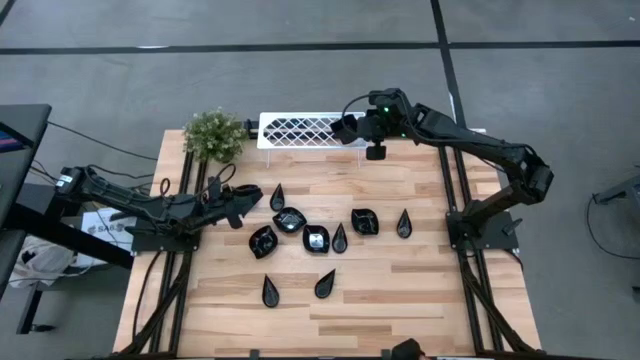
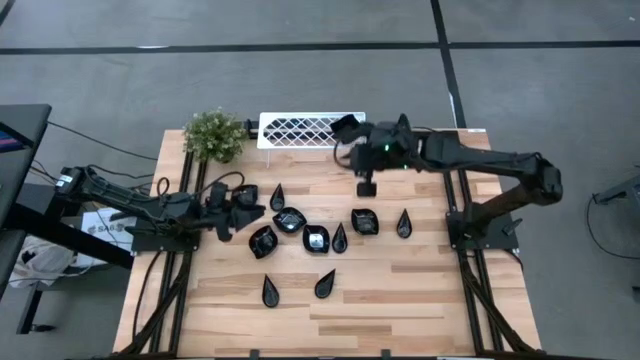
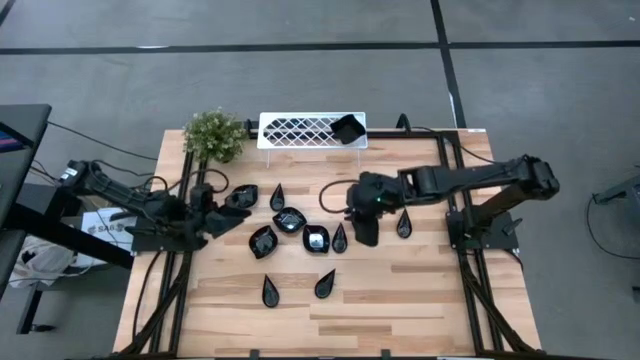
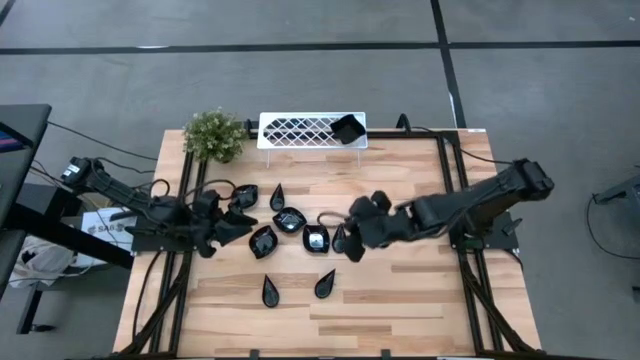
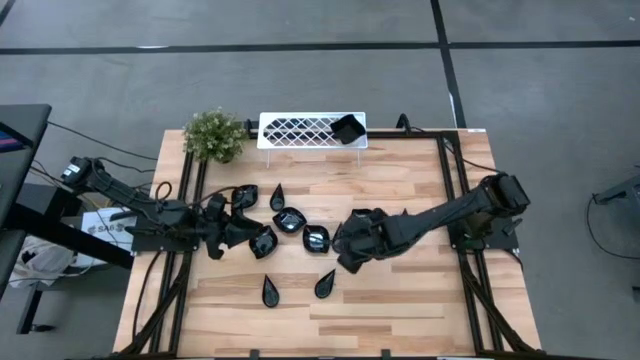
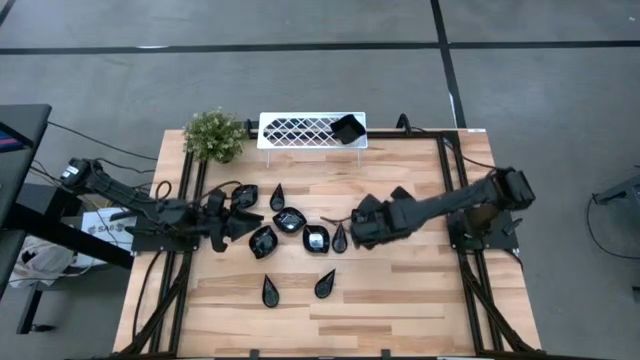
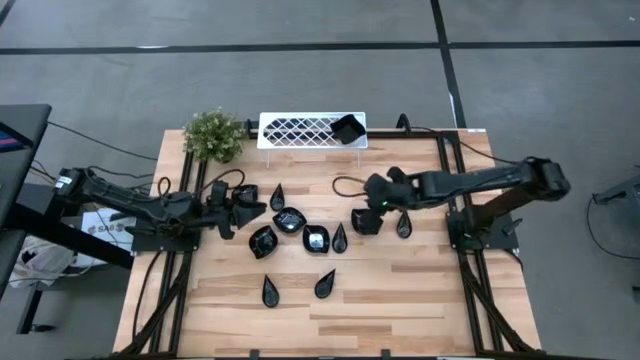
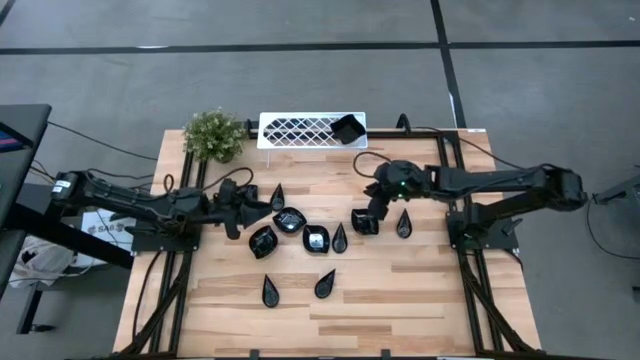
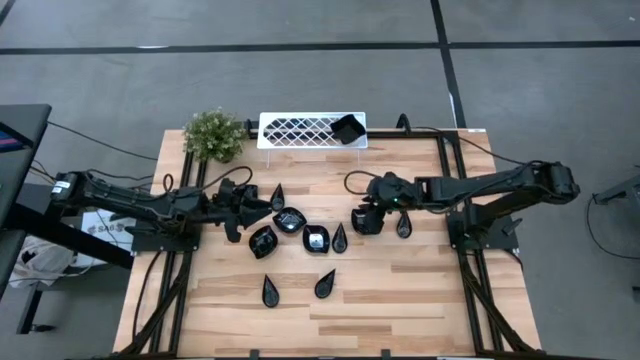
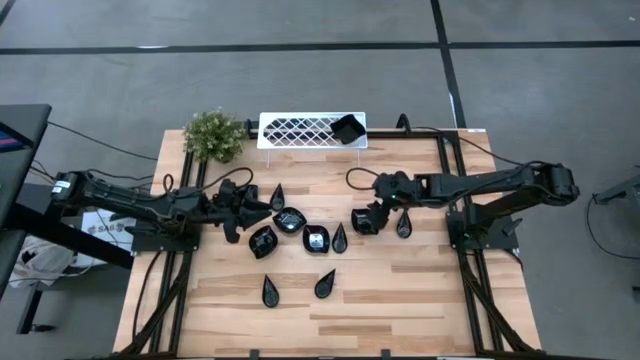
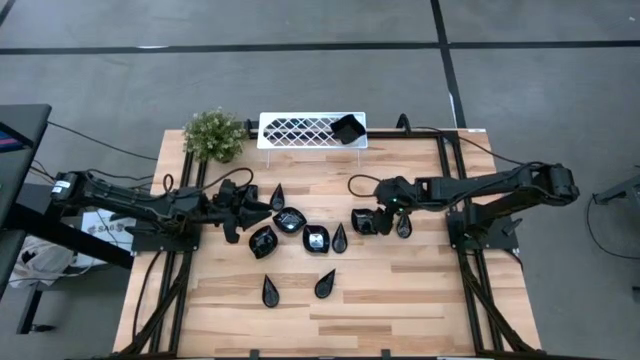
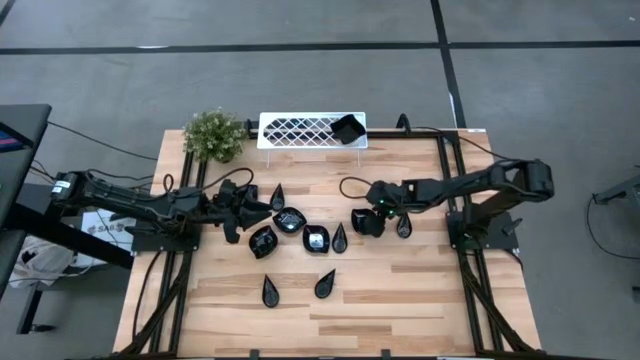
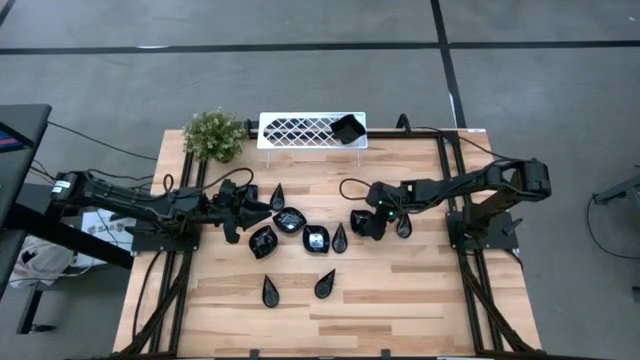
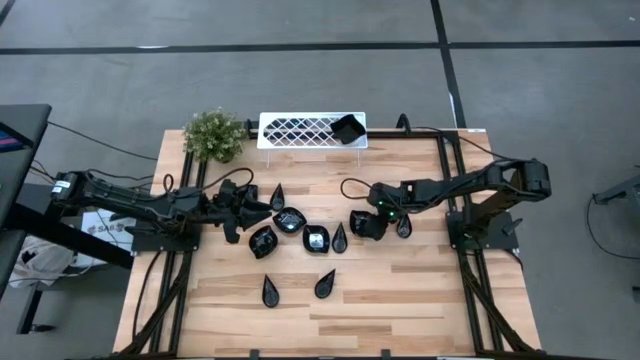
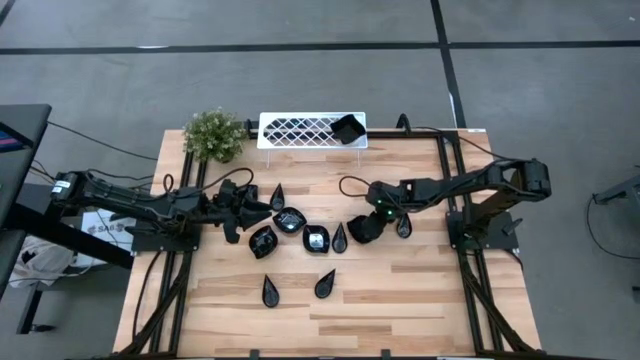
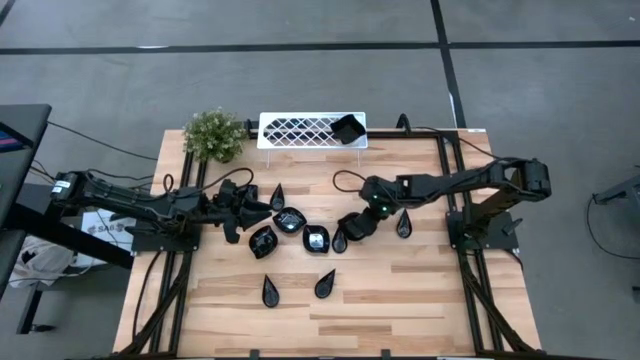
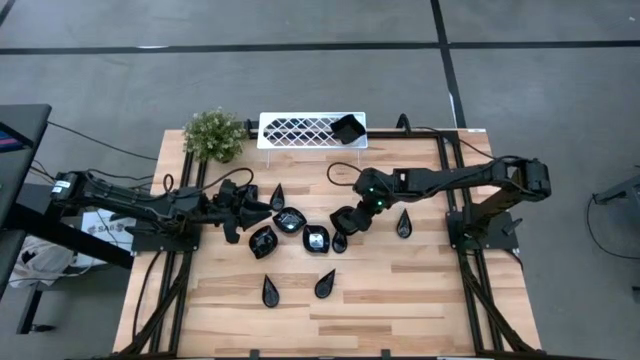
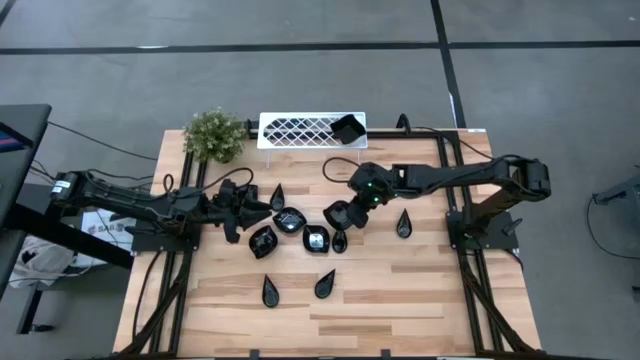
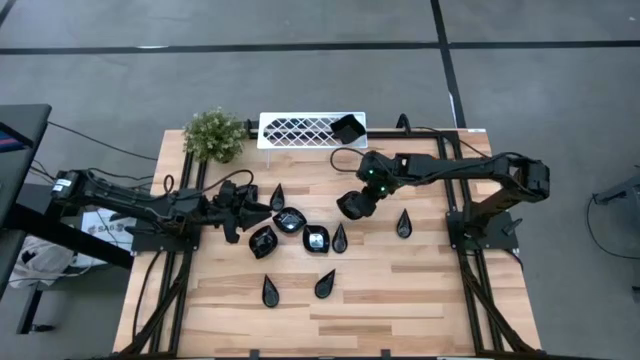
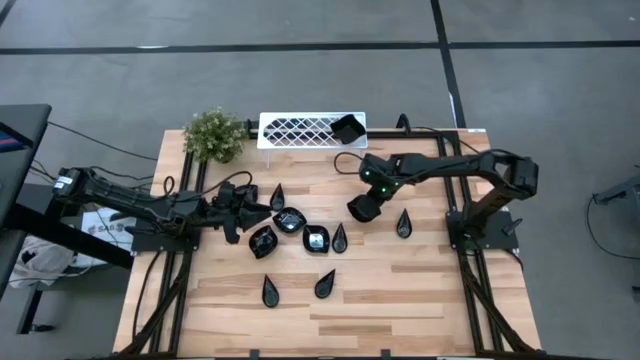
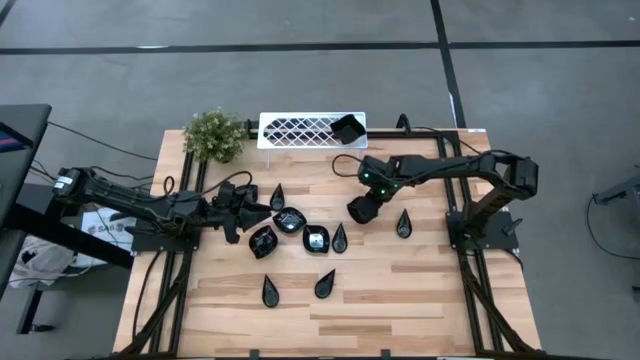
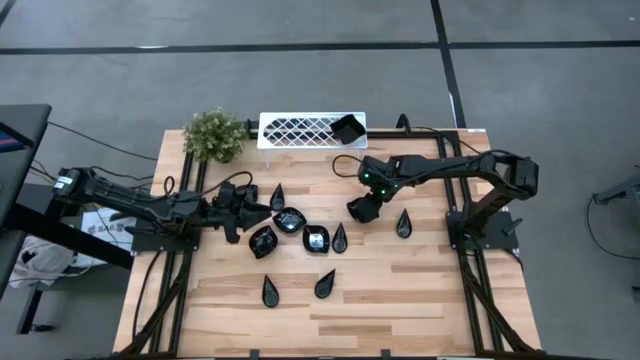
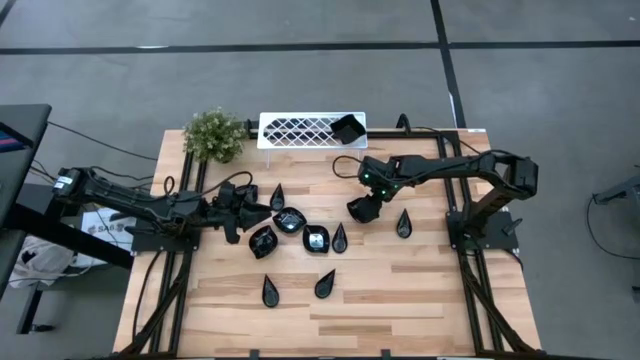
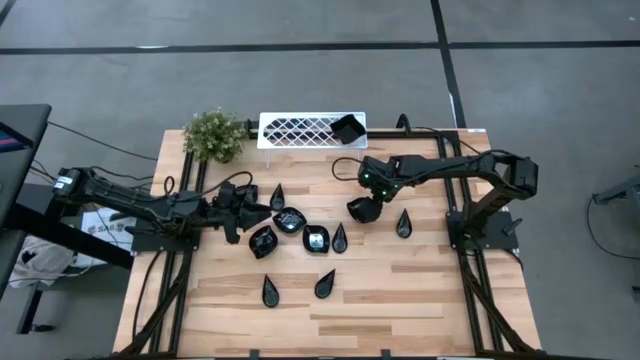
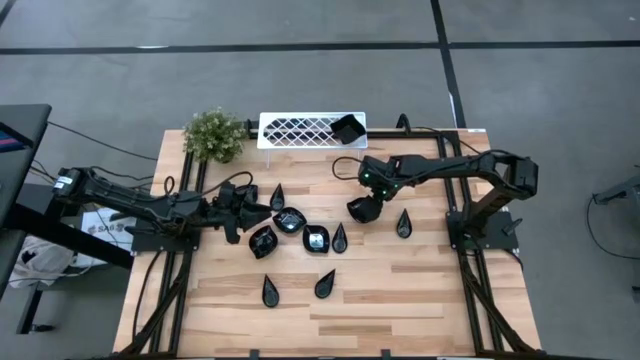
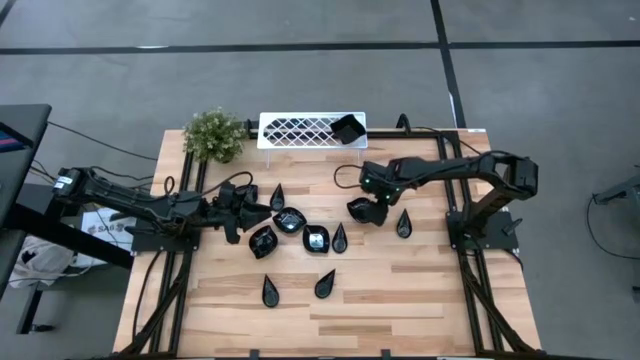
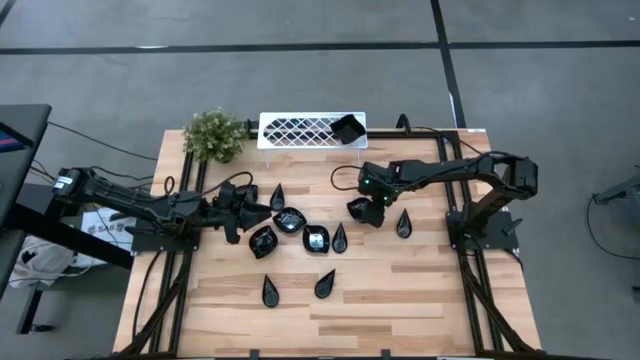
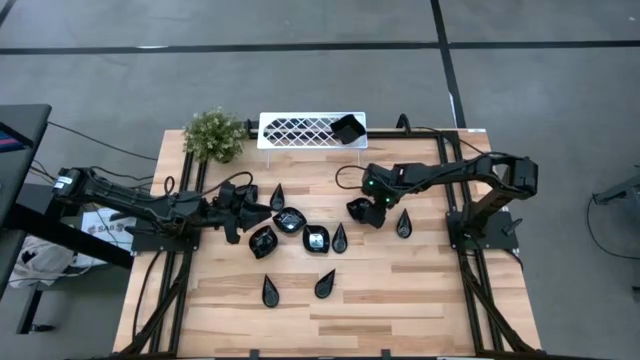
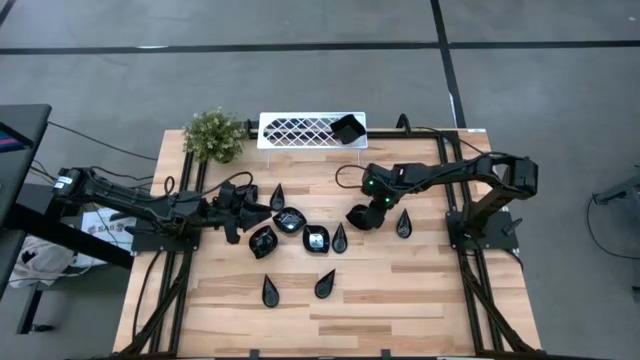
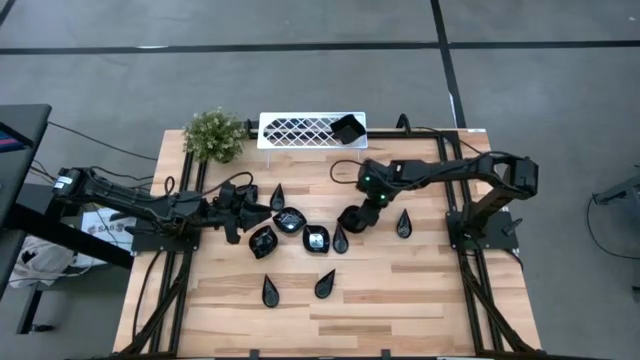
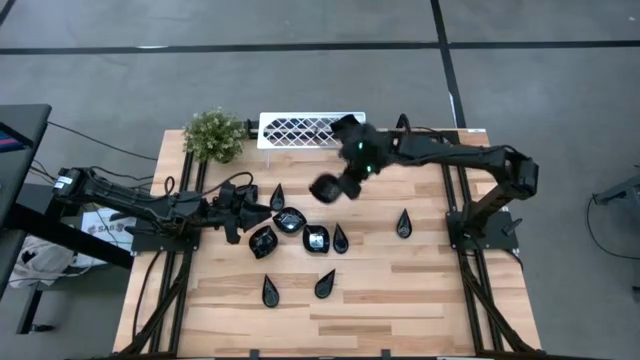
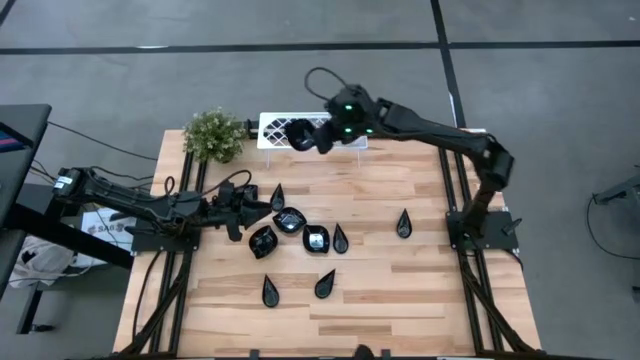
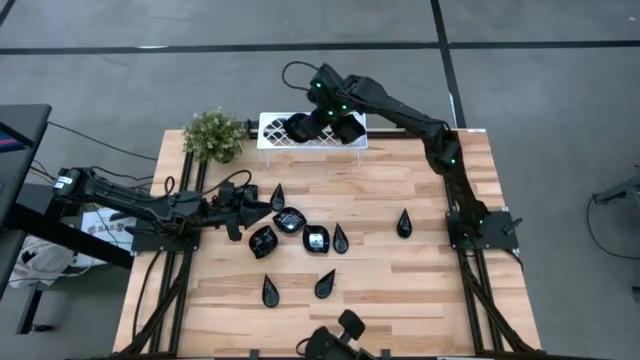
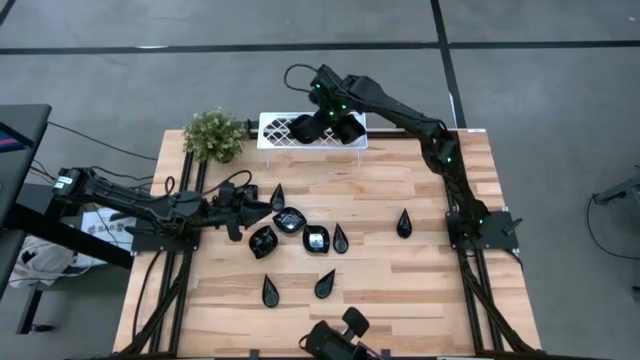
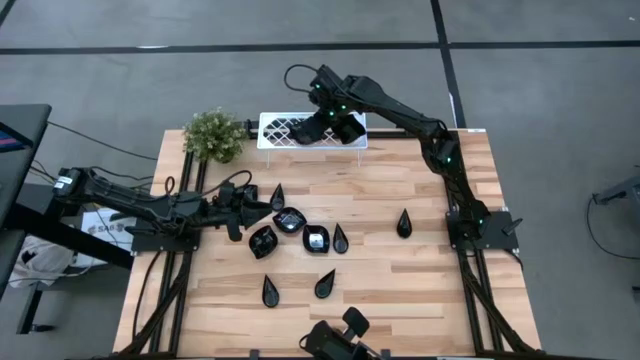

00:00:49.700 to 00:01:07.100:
Task: Pick & Place Mini shaped plates
Put the leaf shaped plate on the shelf

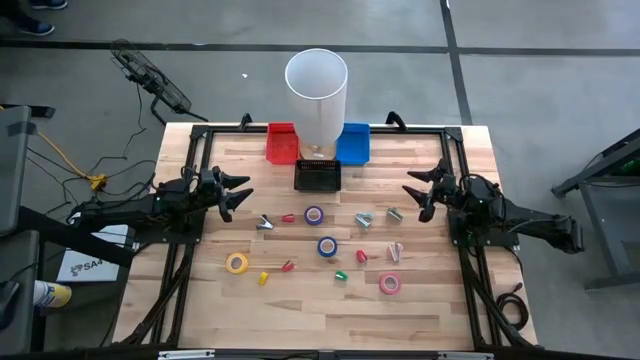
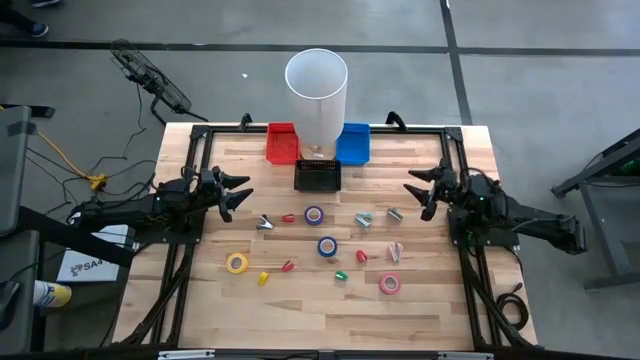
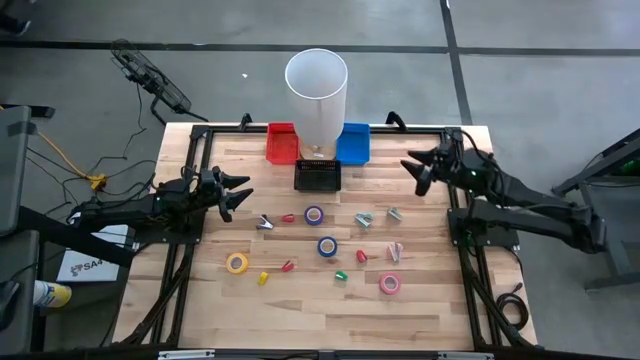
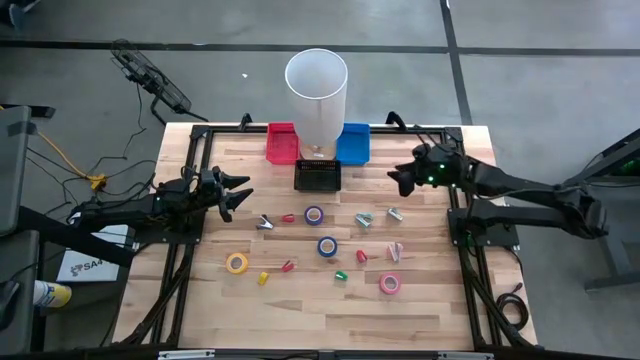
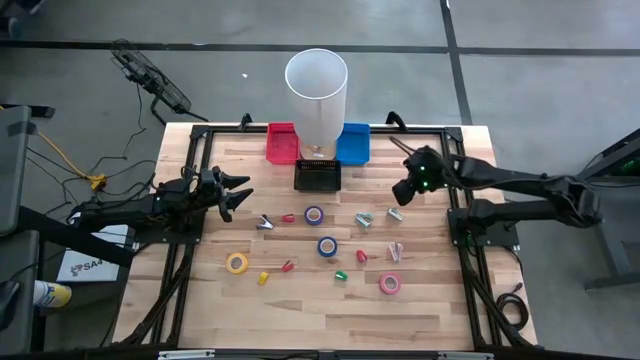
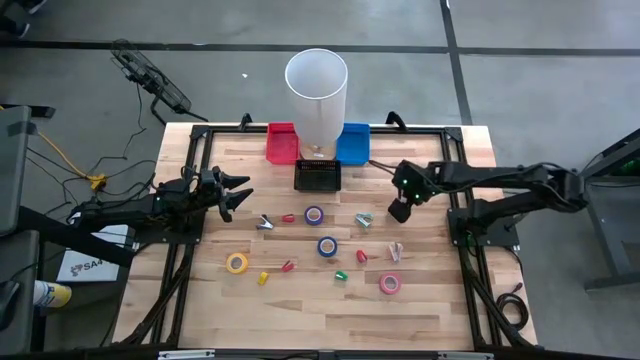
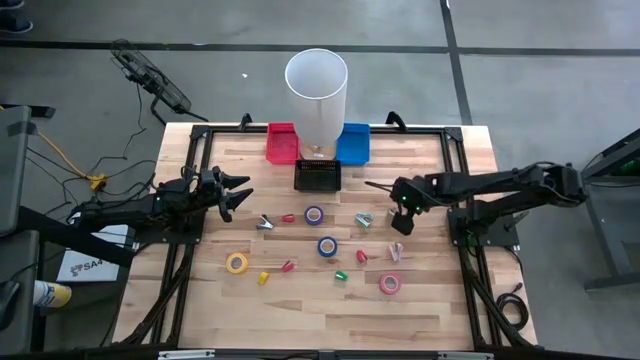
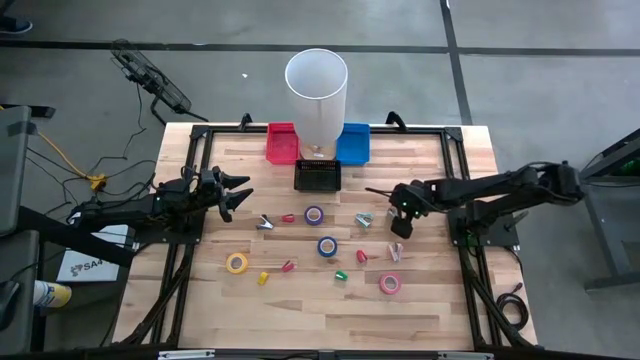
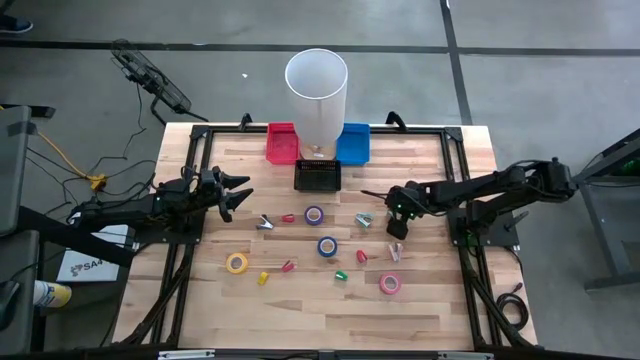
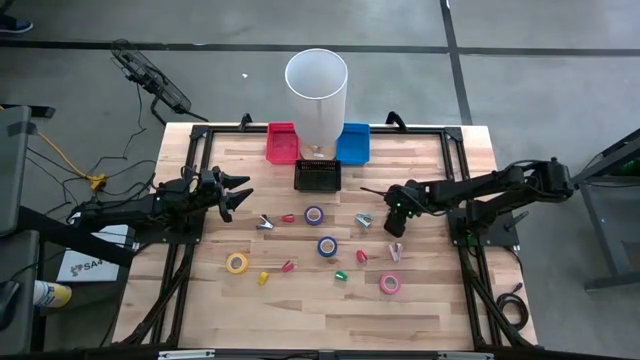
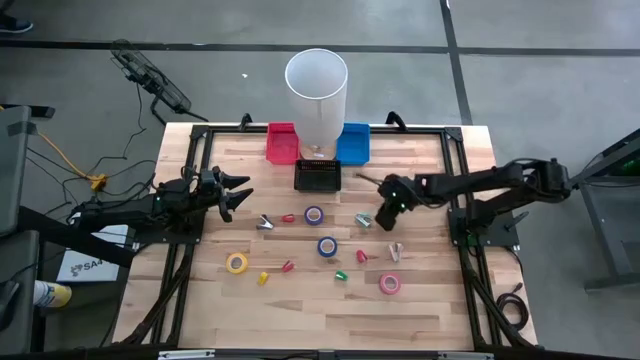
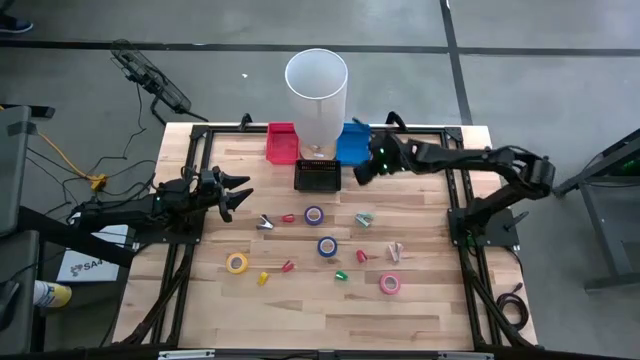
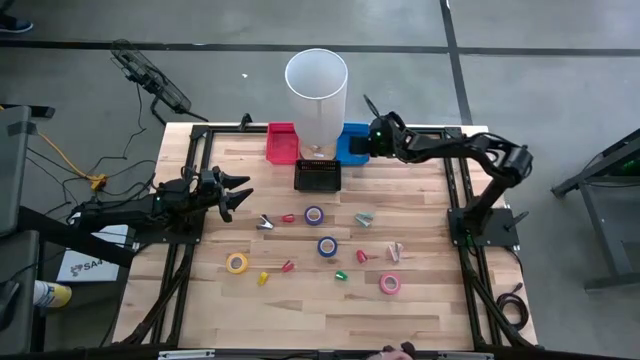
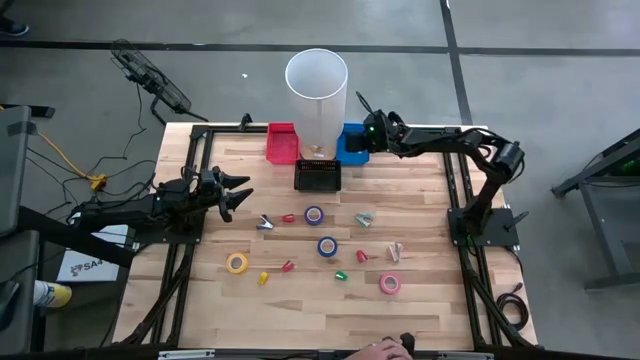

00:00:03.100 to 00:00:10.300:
Task: Pick and place Stapler, Stapler remover, tape
Put the gray staple remover into the blue bin
